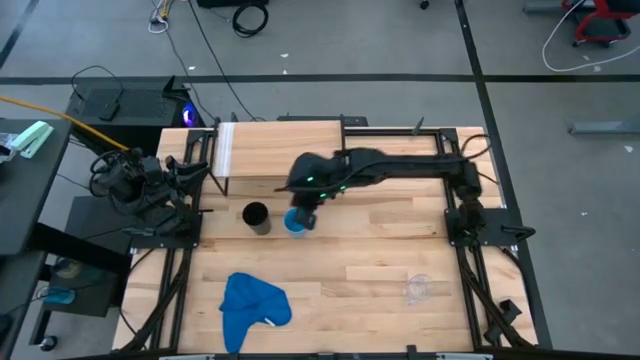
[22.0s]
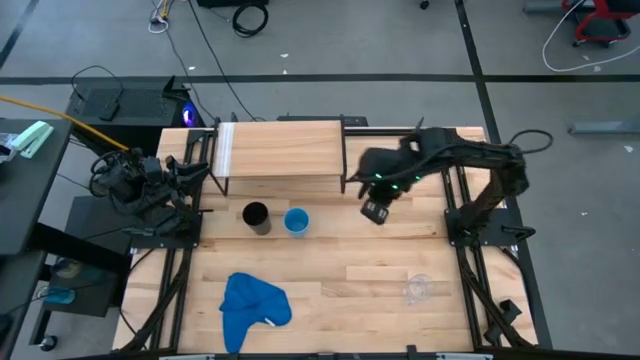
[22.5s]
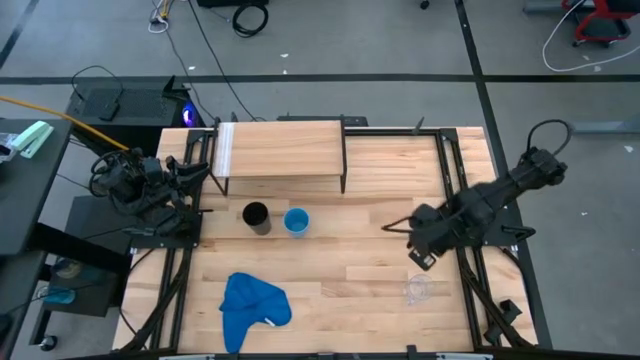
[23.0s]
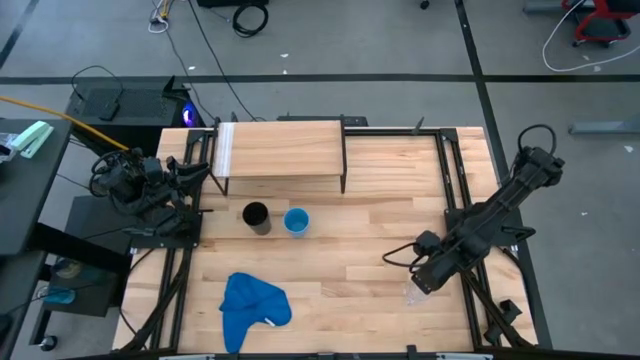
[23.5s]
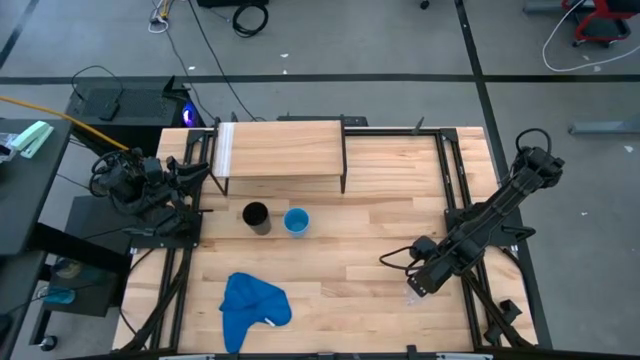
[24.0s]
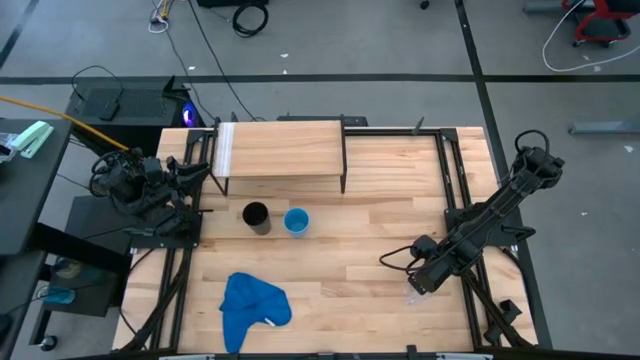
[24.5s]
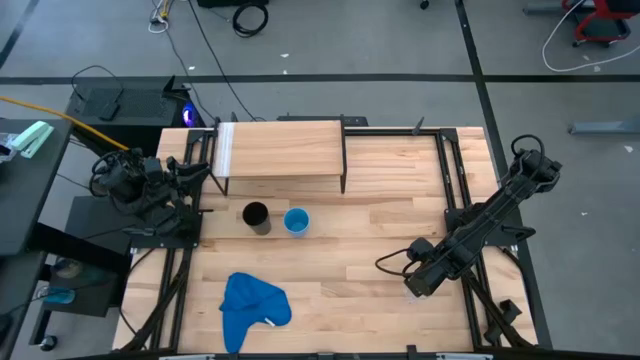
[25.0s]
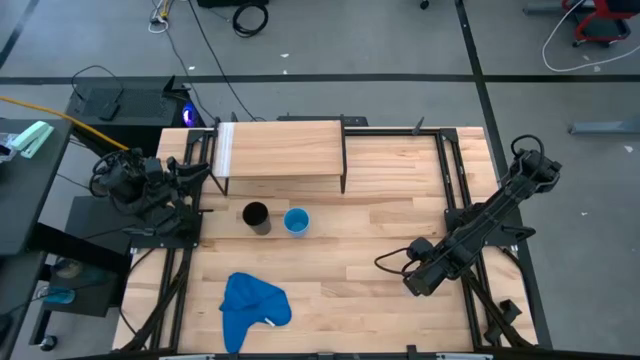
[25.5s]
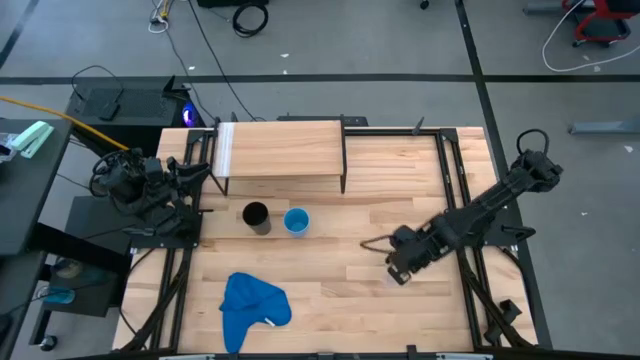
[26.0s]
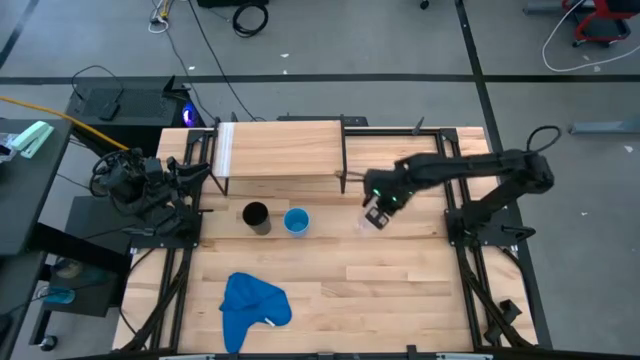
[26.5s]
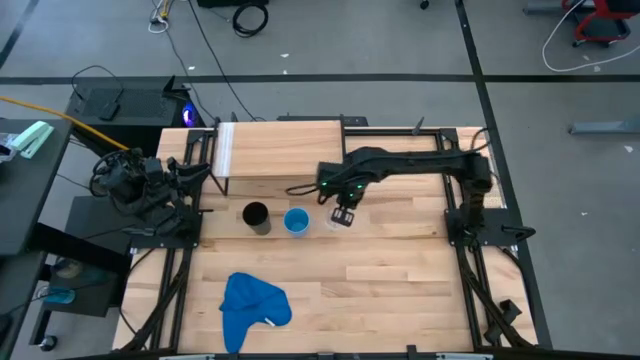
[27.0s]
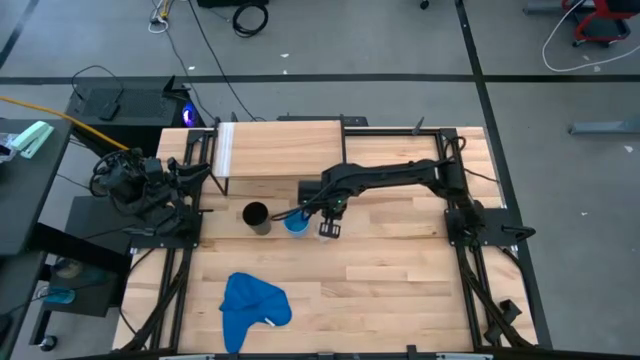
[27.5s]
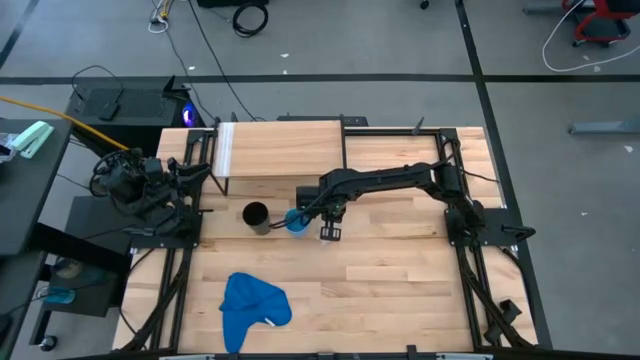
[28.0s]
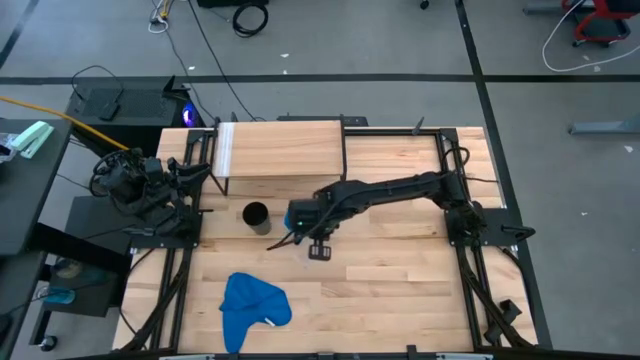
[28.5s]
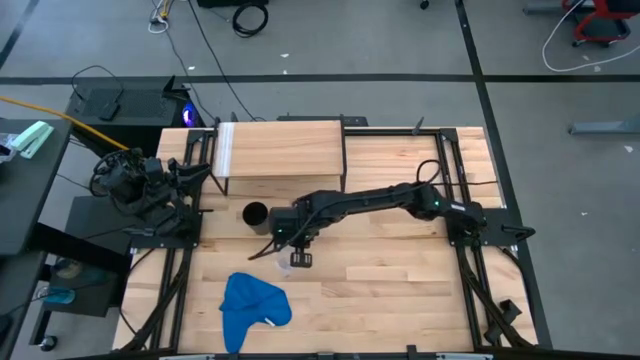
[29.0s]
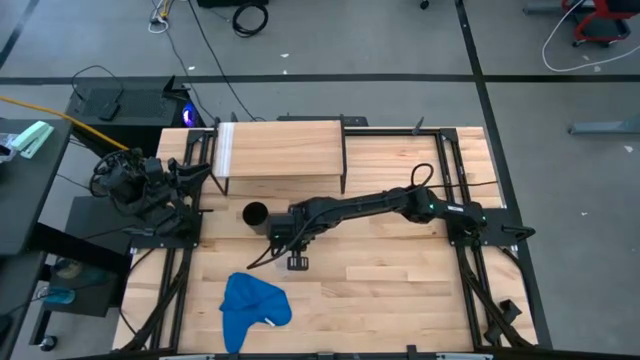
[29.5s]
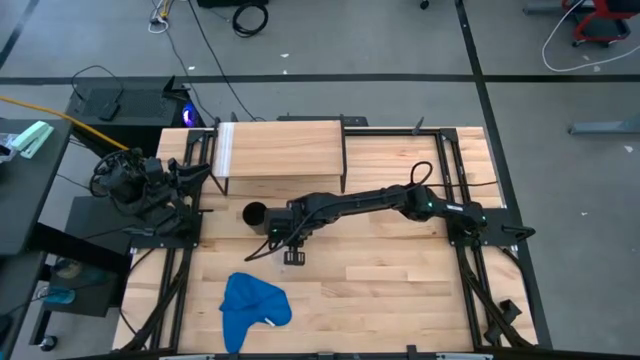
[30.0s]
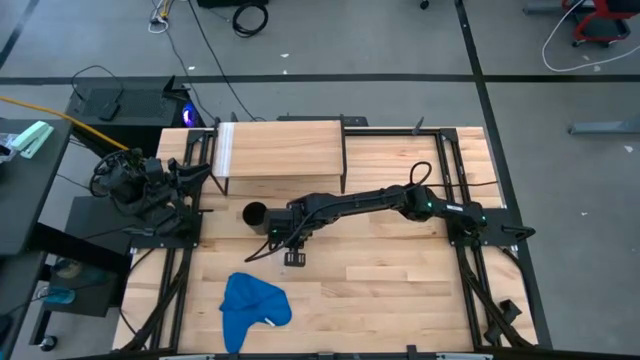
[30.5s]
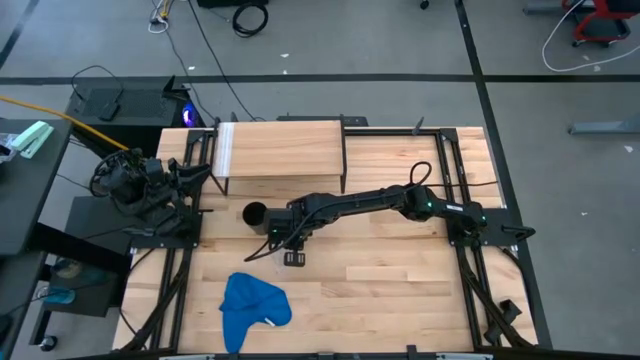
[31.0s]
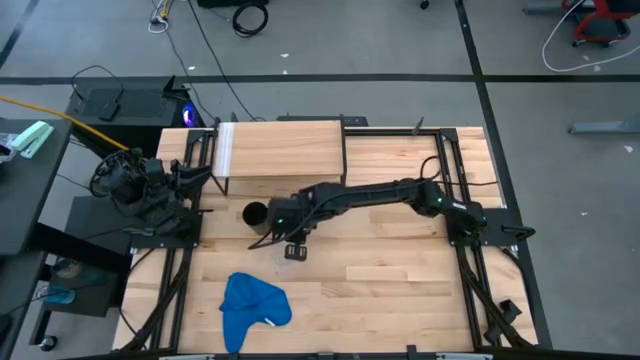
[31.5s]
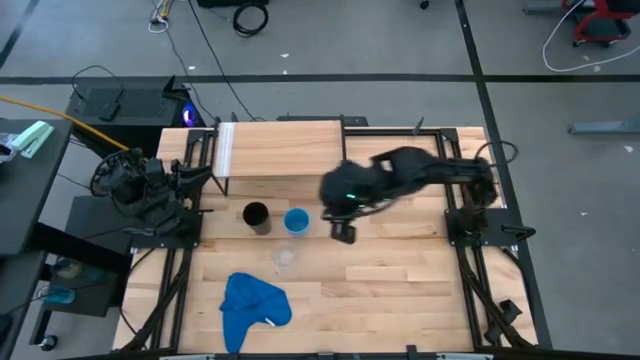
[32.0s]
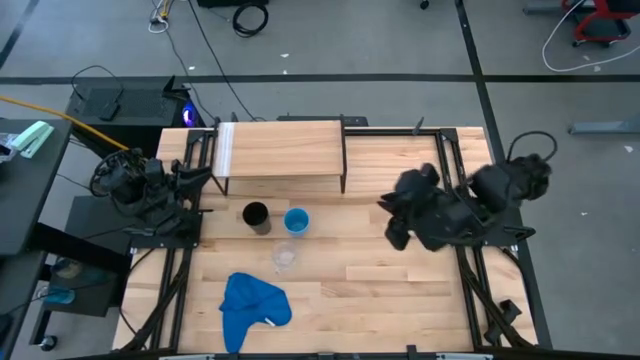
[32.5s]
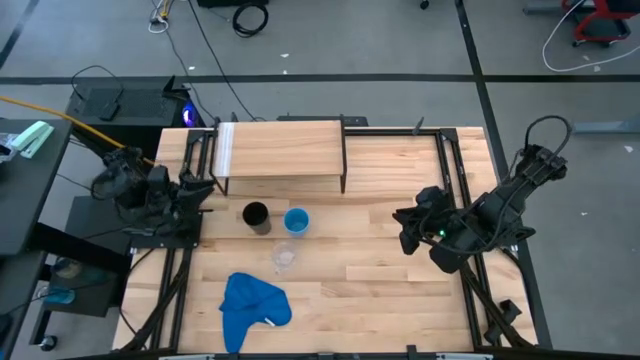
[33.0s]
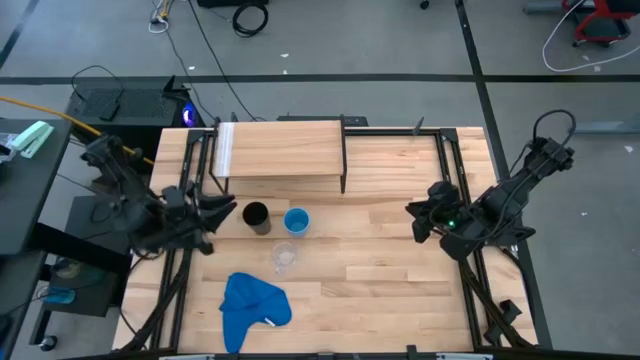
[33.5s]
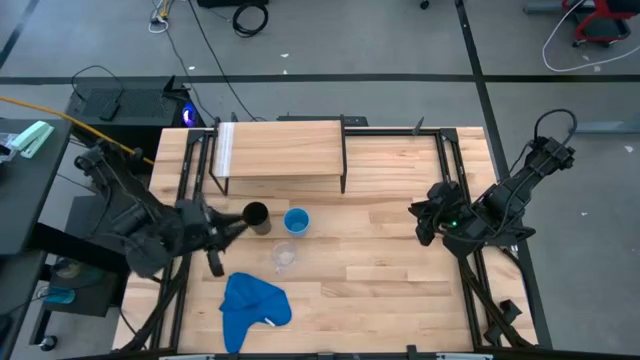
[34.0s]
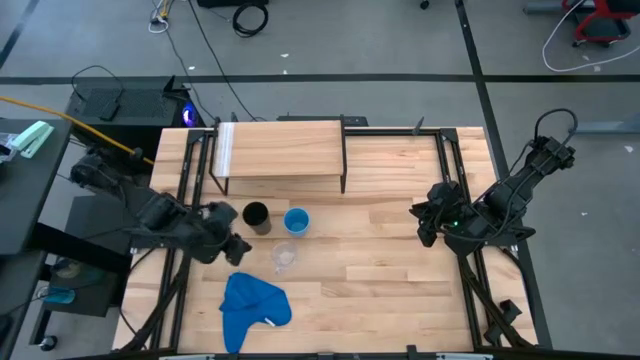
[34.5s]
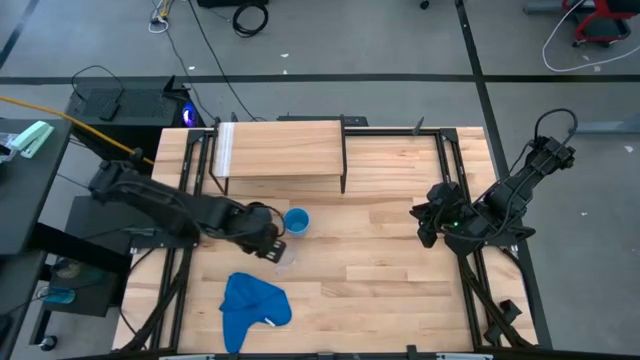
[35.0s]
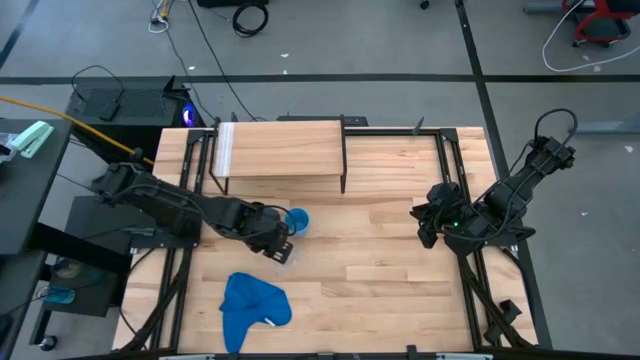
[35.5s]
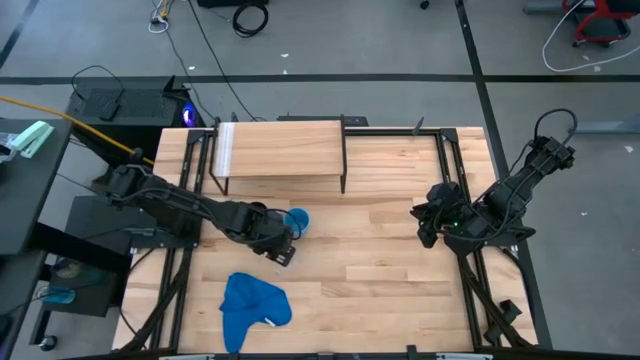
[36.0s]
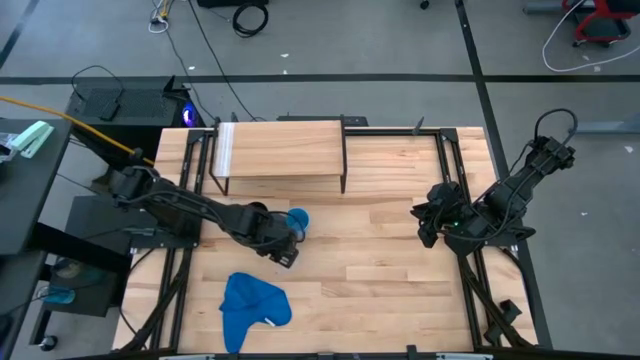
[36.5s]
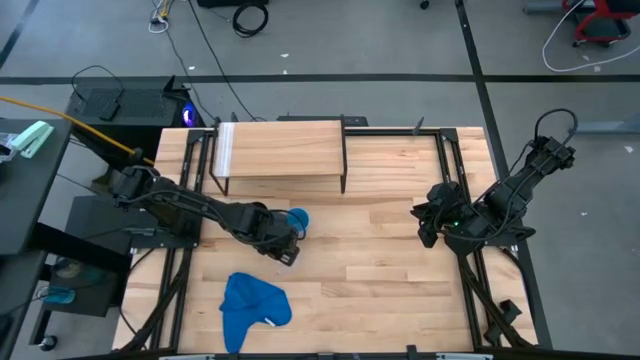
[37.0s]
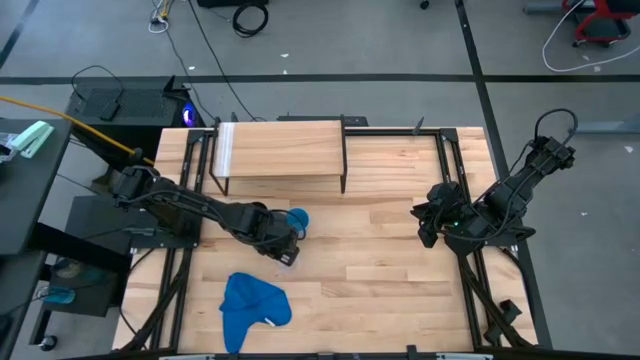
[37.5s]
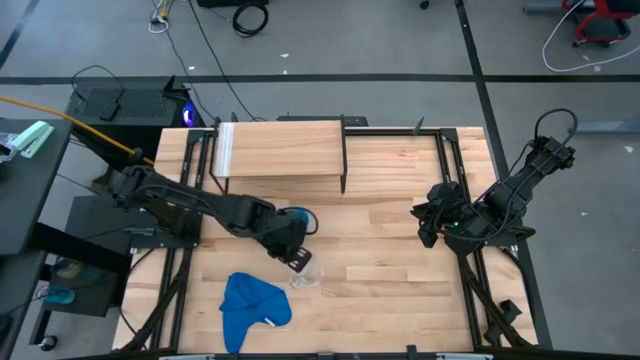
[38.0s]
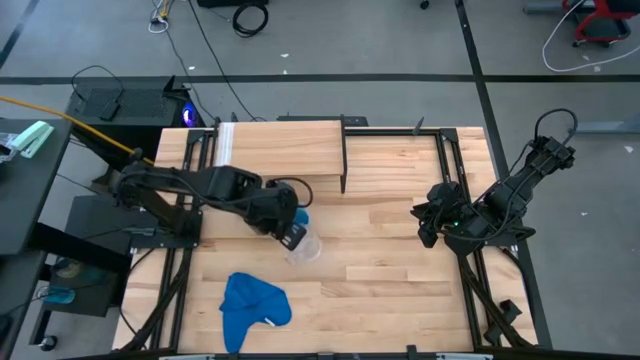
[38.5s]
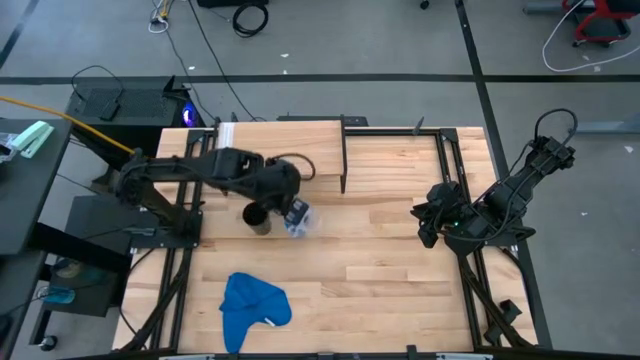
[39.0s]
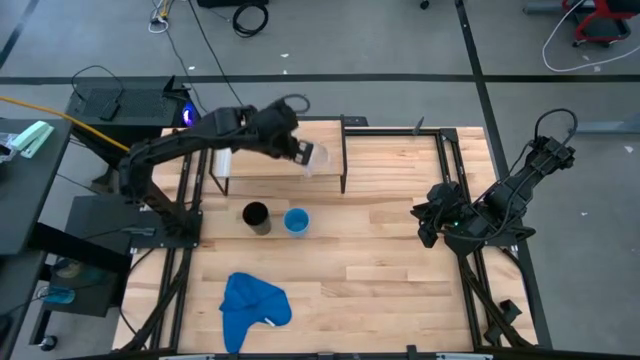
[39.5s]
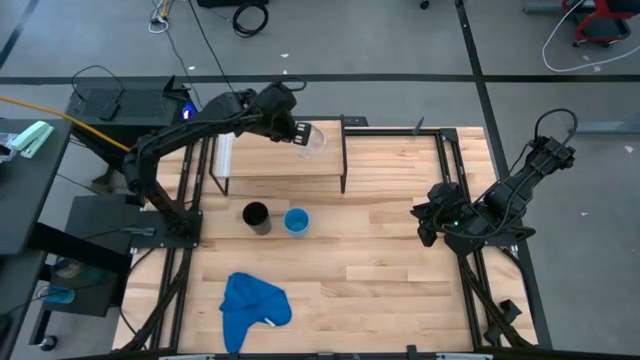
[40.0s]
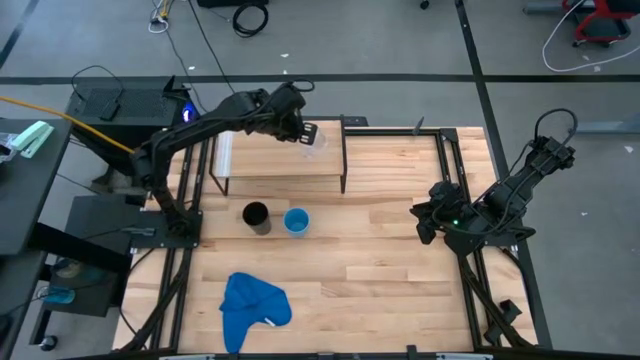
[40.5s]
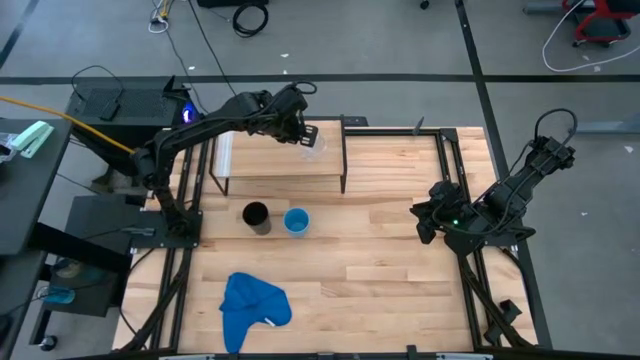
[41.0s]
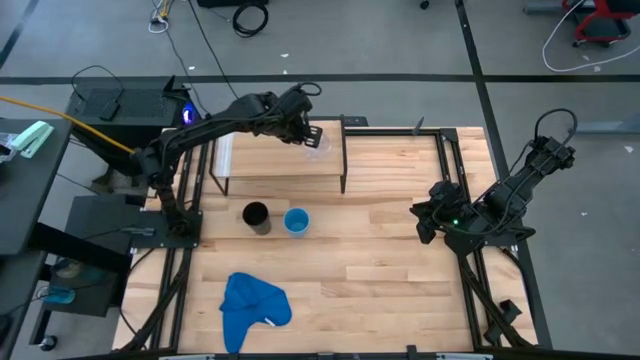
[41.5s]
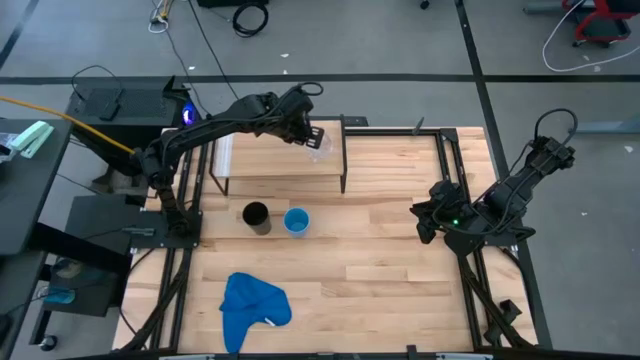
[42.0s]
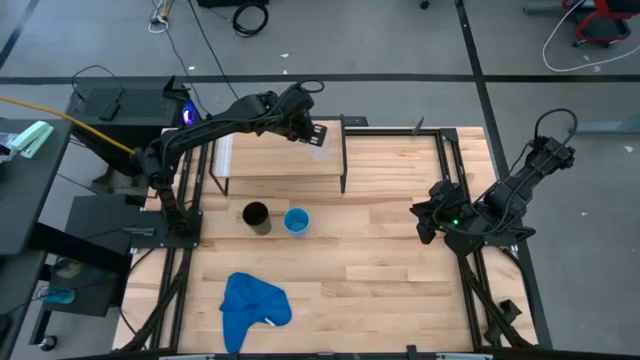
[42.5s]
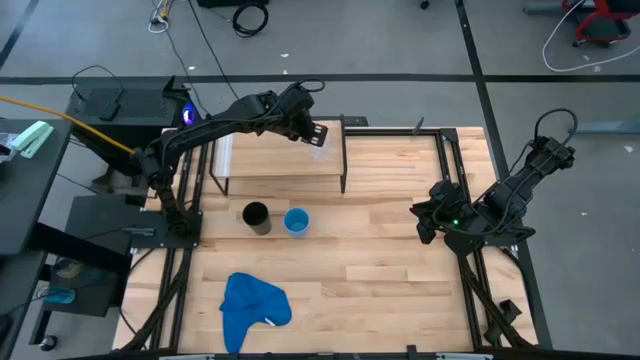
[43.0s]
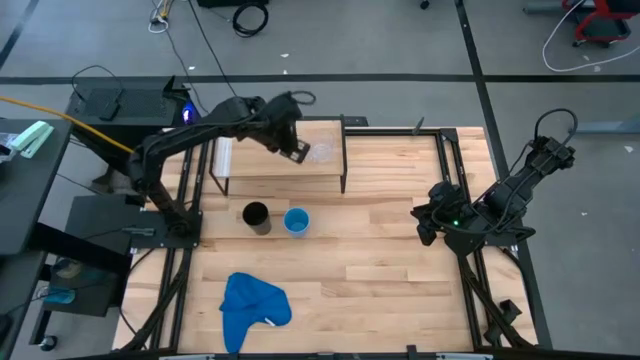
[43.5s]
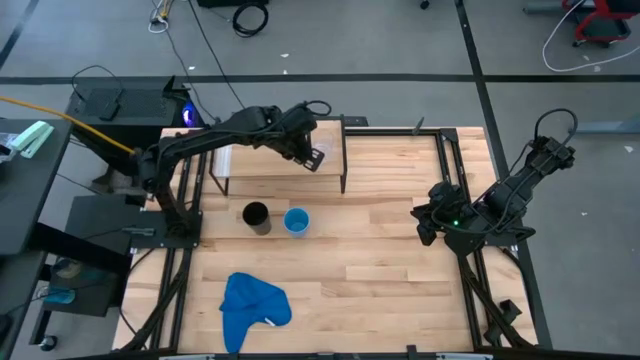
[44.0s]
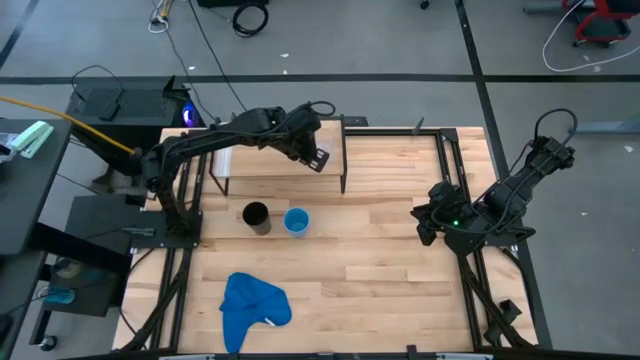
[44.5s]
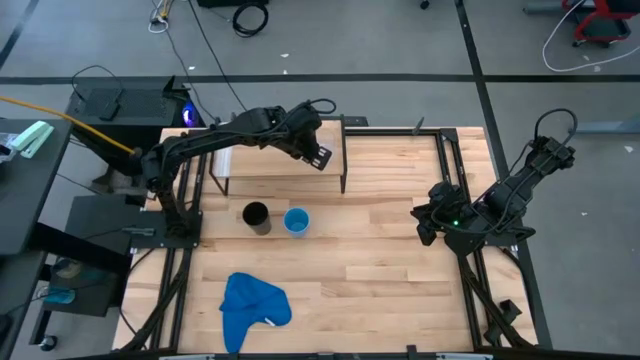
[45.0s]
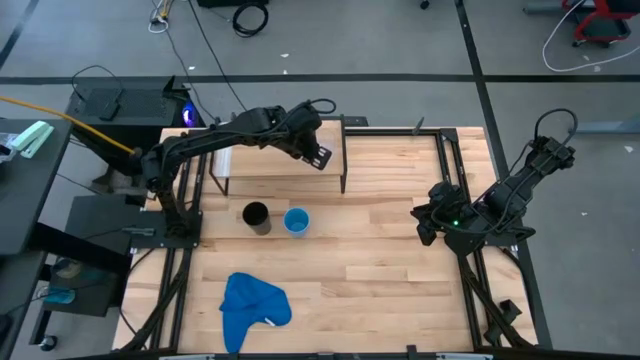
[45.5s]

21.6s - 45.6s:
Task: Stack small to large cups/mugs on shelf
Put the transparent mug on the shelf
